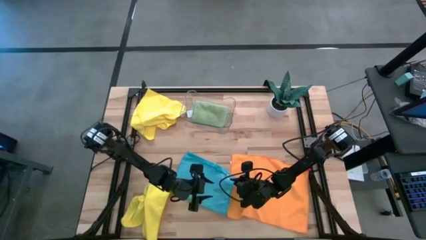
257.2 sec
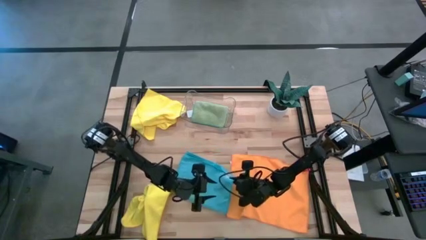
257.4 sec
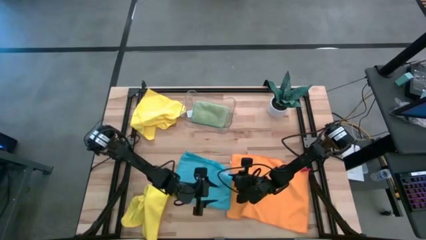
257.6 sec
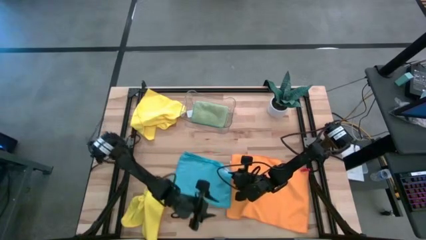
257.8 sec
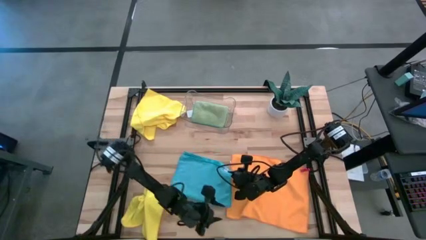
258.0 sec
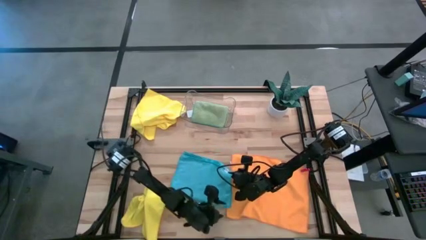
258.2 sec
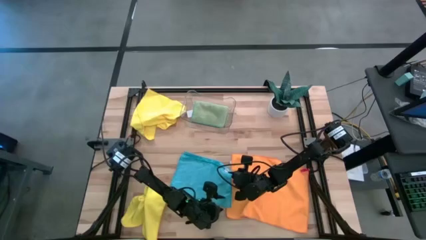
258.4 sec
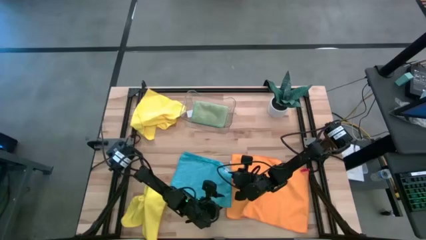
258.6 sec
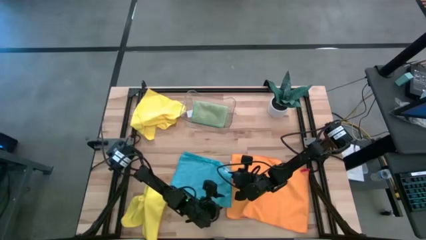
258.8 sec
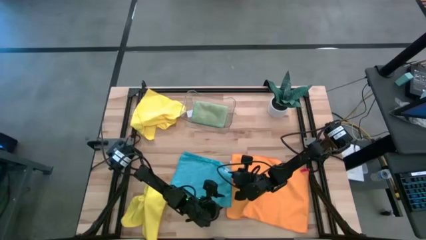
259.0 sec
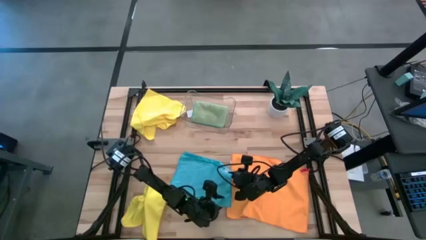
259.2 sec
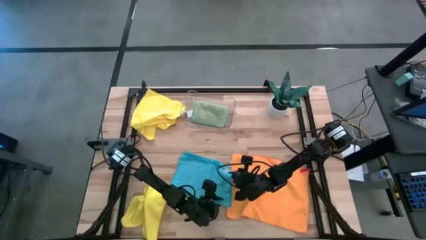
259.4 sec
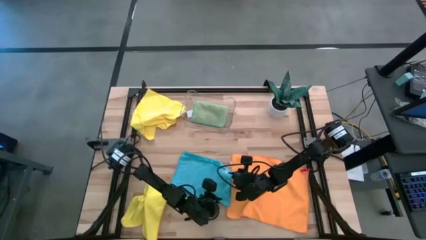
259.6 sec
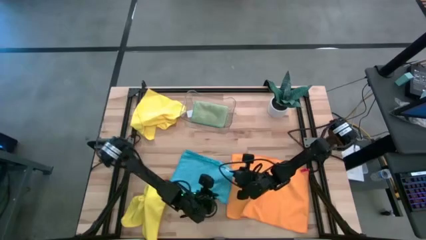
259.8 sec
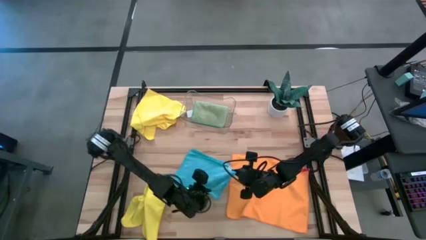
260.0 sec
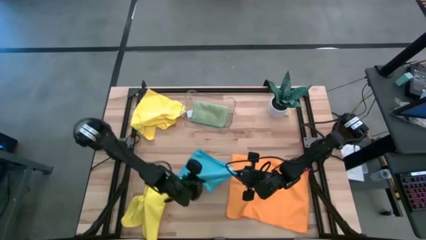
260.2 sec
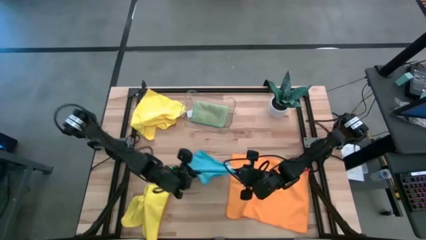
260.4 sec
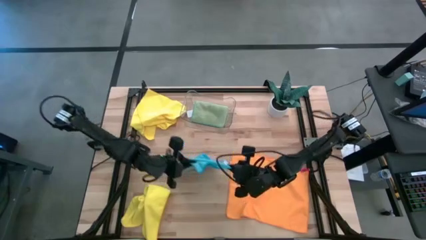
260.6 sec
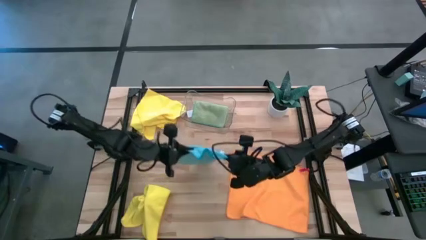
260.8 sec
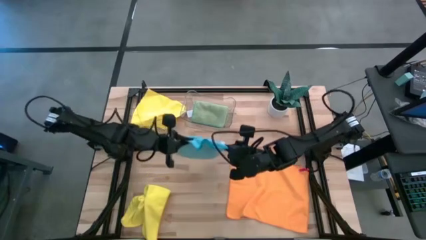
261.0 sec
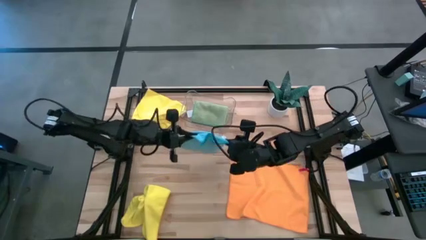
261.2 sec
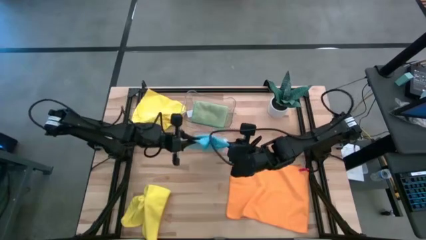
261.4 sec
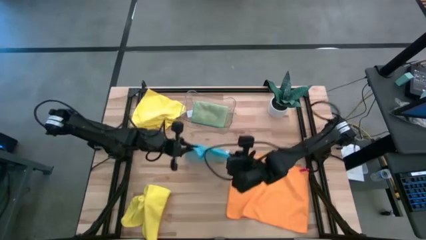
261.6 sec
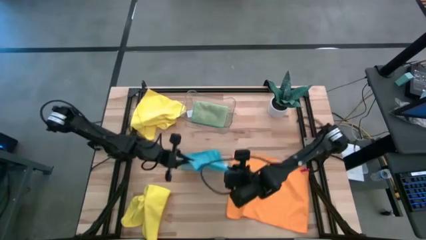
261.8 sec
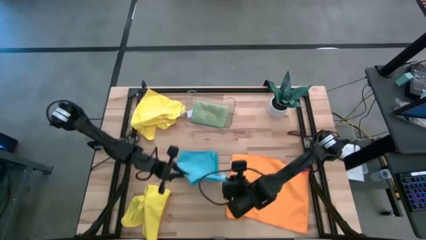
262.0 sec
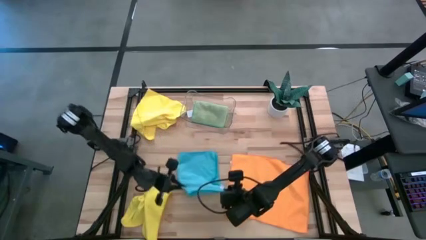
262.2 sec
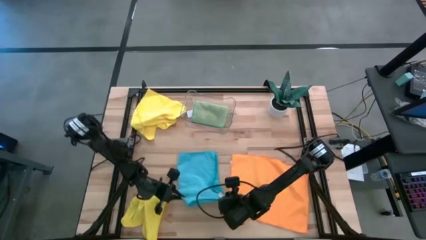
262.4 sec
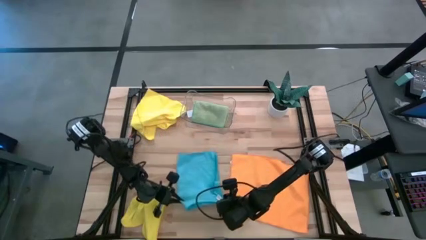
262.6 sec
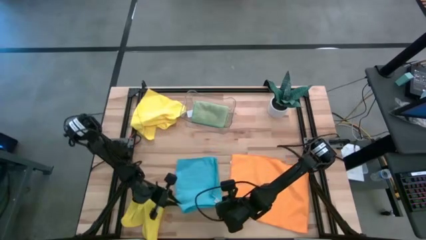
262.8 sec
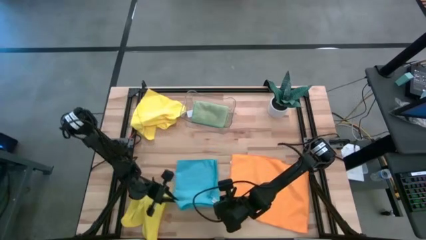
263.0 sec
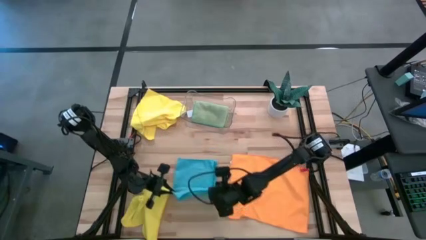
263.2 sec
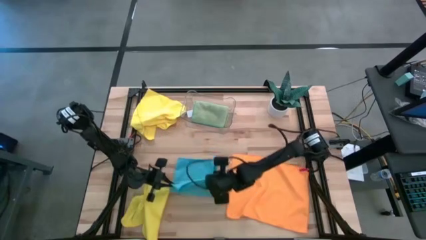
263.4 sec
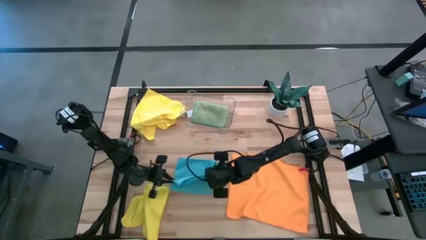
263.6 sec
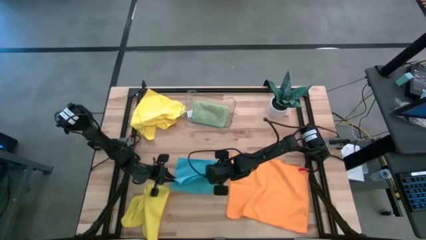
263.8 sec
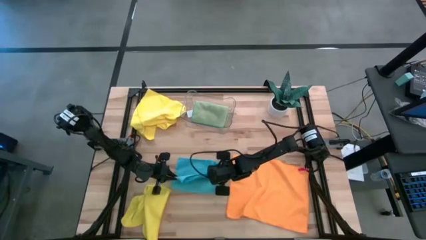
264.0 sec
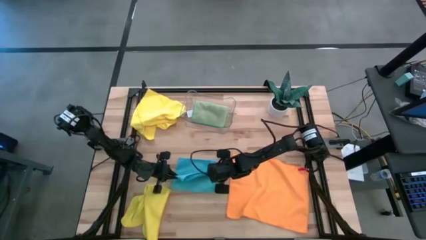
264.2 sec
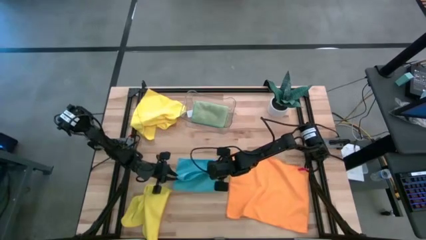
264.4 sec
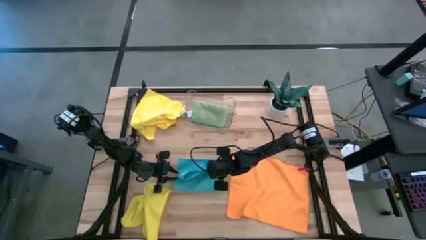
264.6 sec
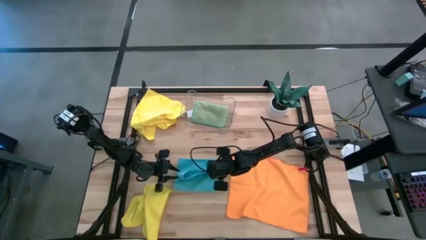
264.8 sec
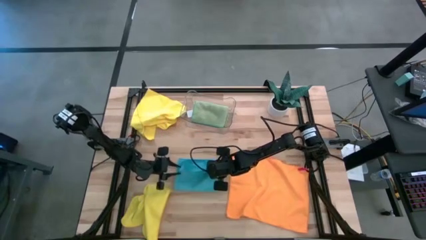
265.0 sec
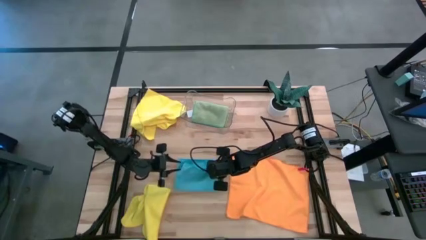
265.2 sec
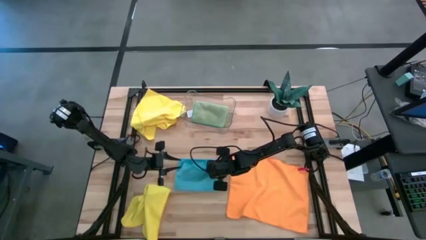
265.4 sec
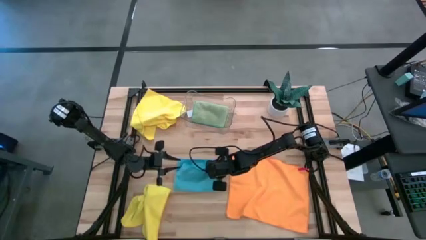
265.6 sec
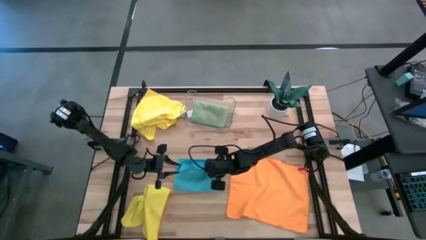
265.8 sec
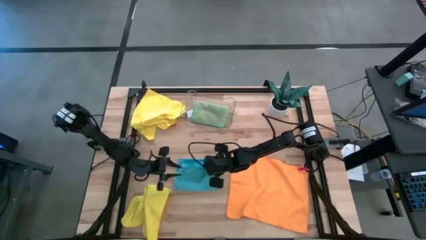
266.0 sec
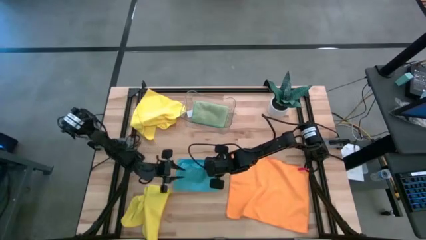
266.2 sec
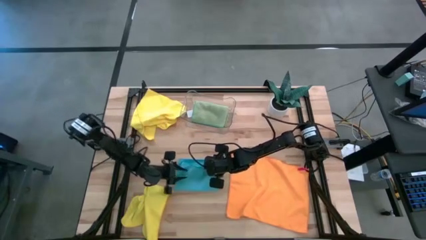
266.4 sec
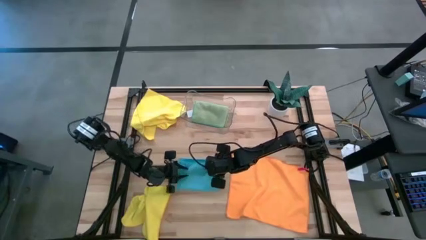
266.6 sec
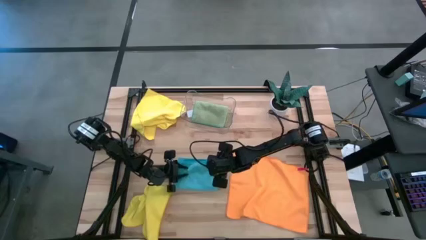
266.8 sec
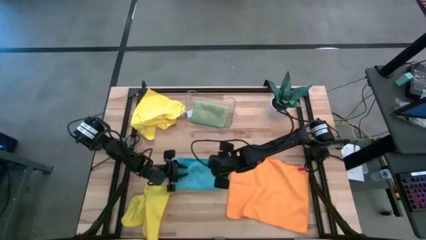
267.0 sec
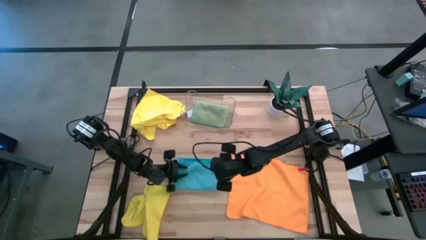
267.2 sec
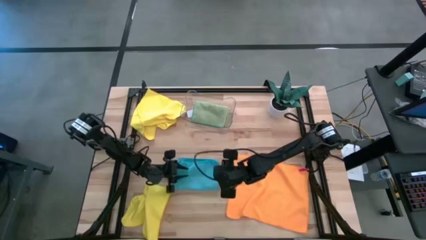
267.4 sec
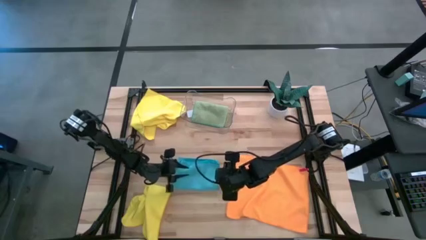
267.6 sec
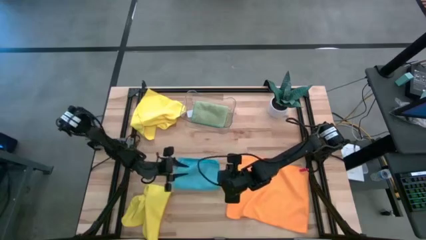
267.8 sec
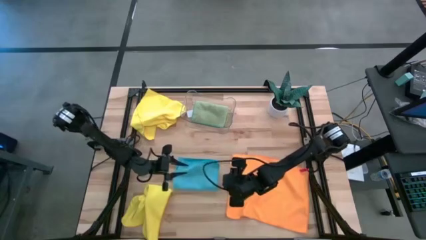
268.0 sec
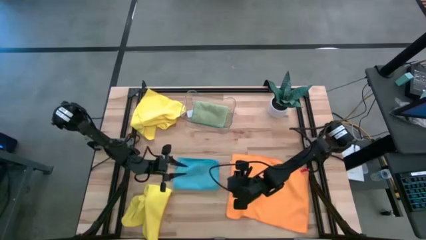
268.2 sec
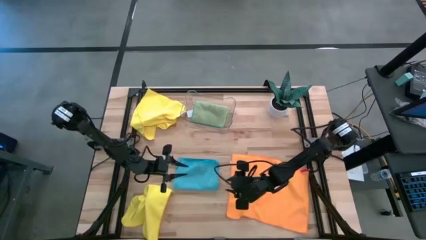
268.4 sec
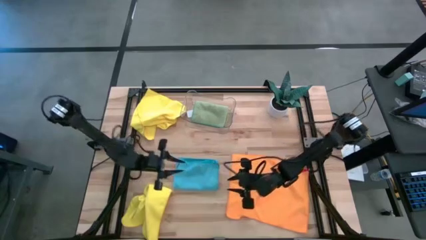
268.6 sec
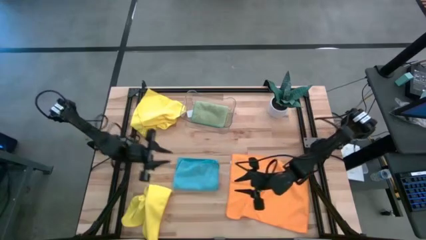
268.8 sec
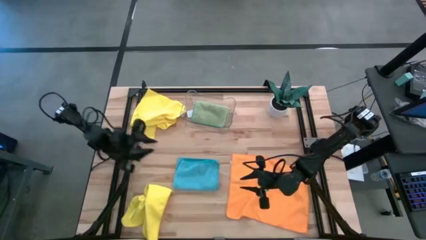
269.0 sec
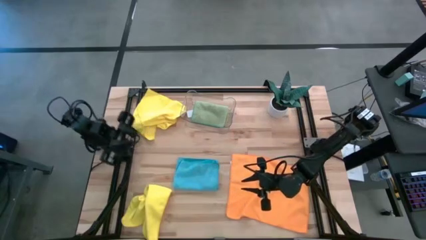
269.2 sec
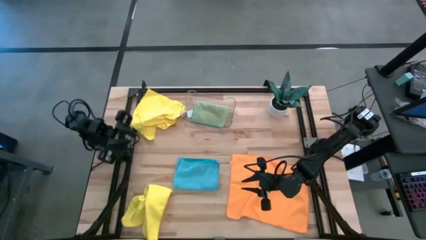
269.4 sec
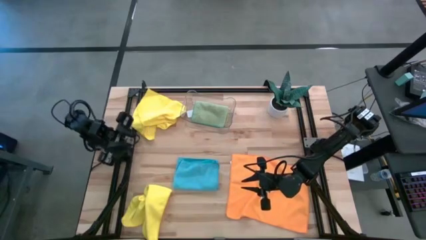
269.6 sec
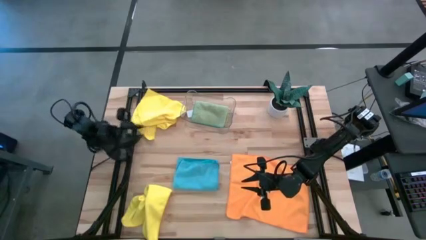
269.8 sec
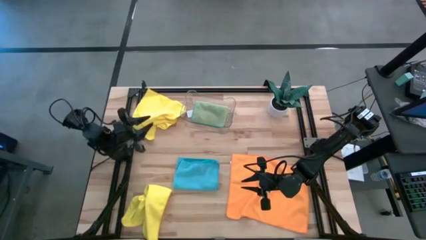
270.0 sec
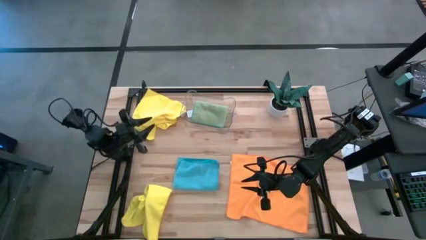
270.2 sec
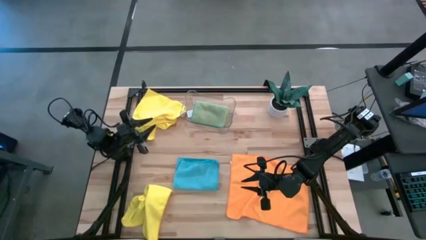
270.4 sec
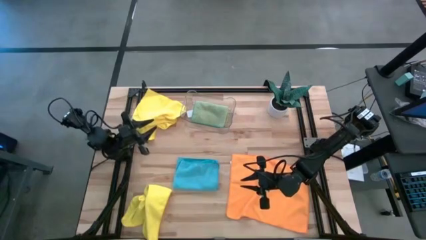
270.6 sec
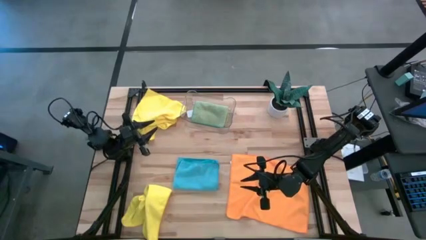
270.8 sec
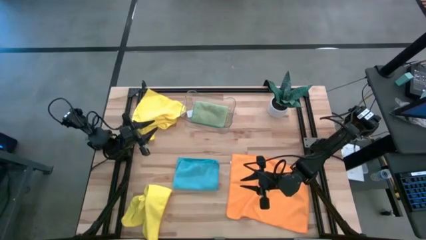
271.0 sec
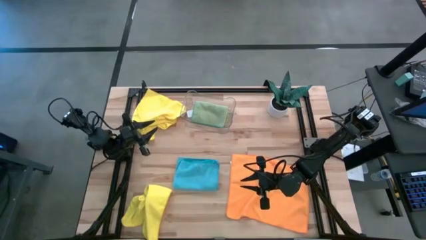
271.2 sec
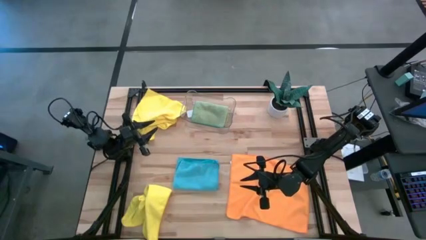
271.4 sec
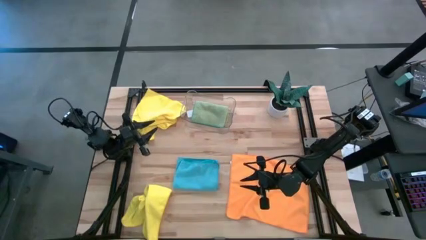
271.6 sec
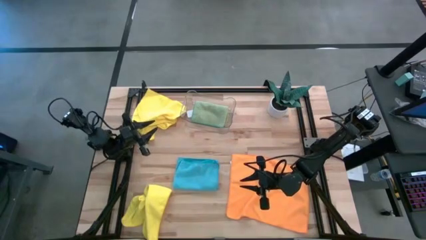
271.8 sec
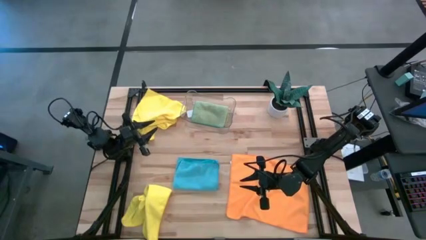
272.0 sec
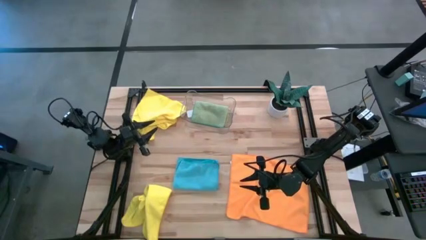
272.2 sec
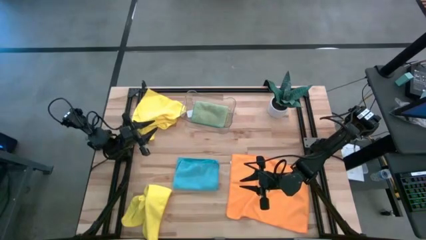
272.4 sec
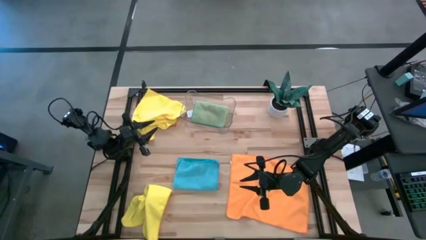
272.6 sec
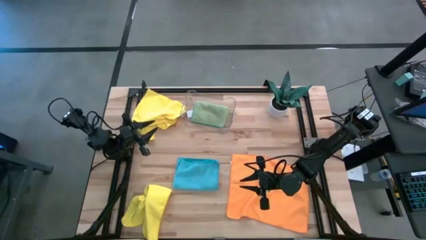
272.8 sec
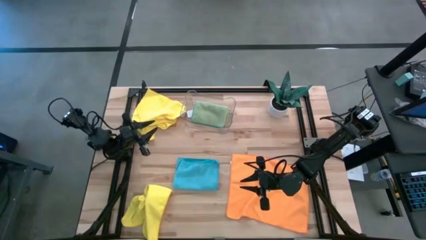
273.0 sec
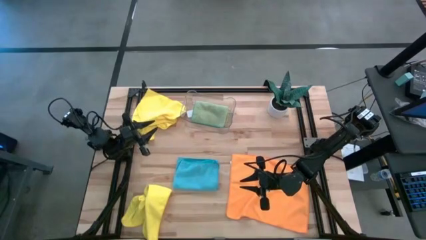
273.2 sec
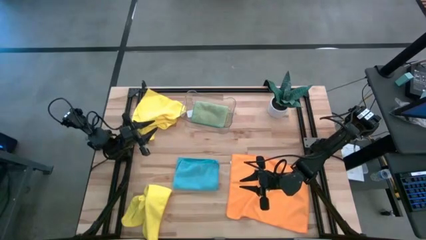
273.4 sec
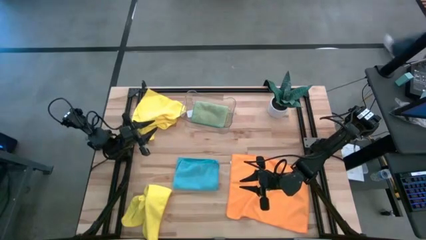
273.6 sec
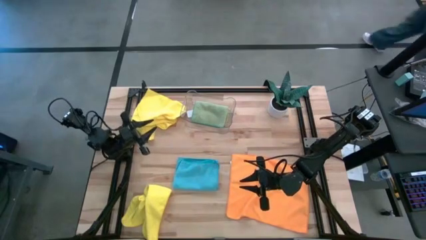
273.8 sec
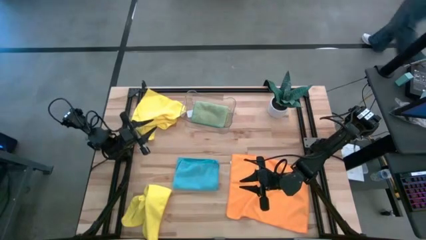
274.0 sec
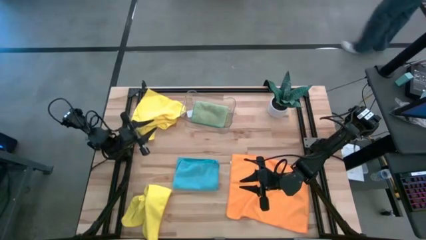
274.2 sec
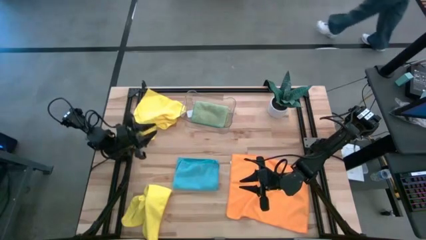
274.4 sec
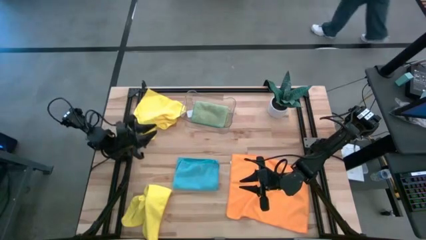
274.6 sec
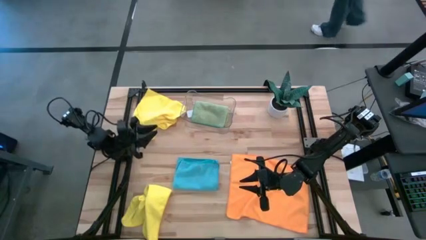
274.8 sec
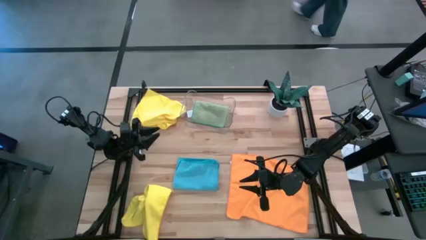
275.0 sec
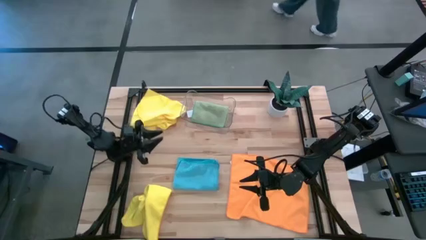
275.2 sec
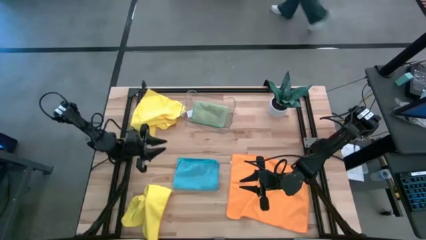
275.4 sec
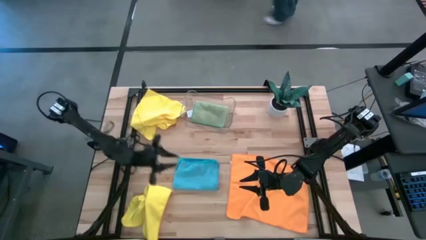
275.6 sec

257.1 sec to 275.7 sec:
Task: Fold microfiber towels
Fold the blue towel
